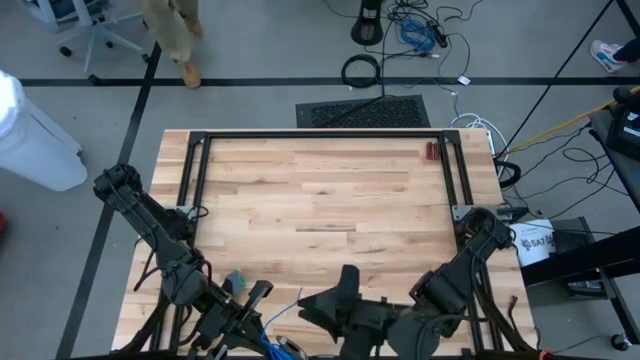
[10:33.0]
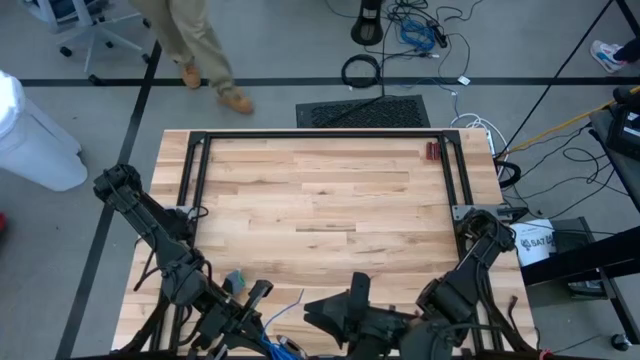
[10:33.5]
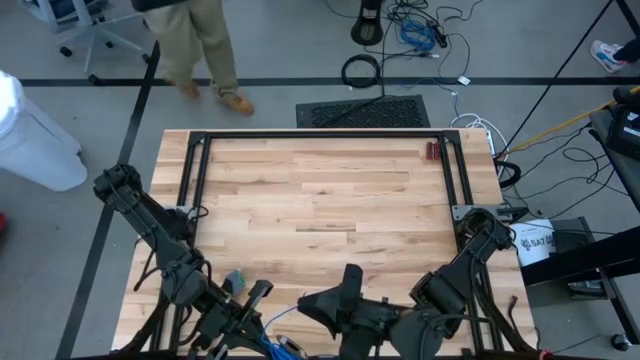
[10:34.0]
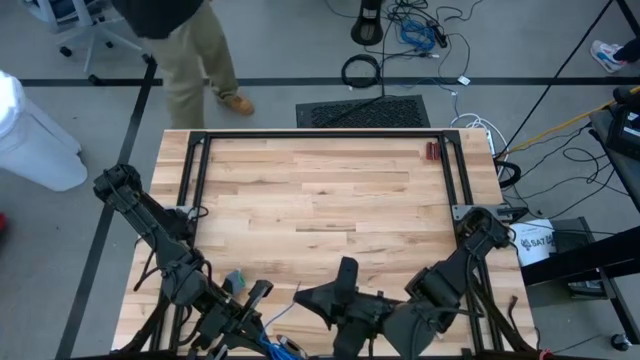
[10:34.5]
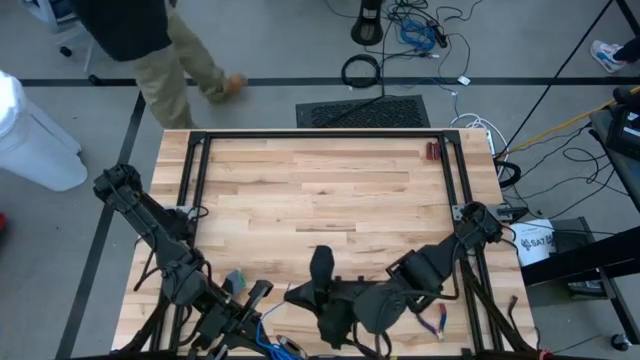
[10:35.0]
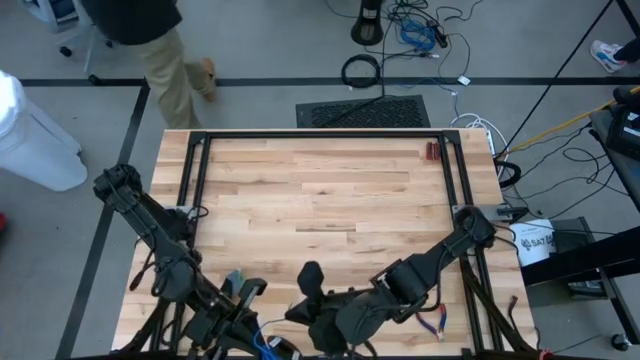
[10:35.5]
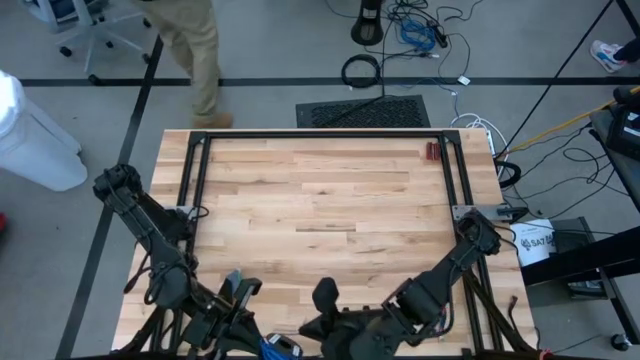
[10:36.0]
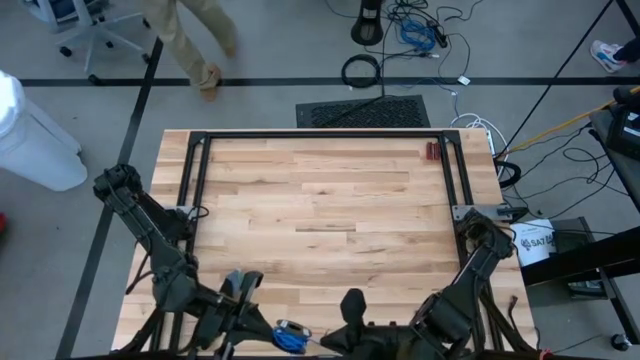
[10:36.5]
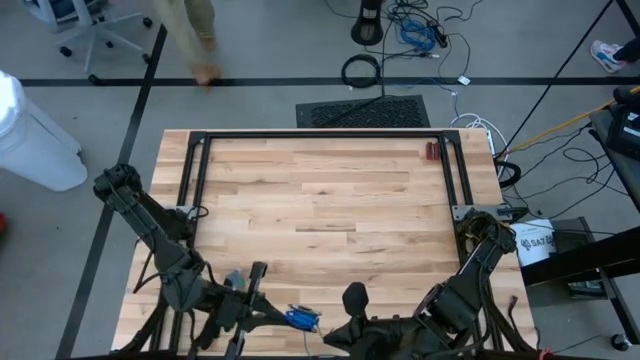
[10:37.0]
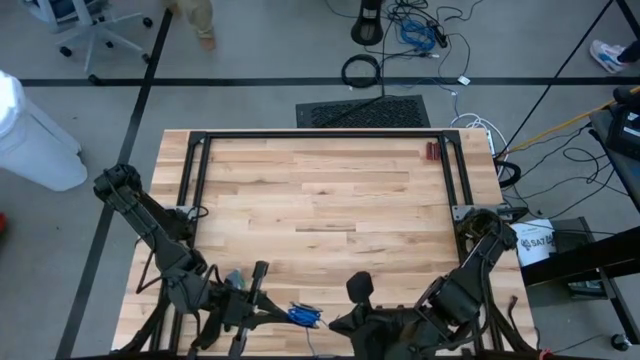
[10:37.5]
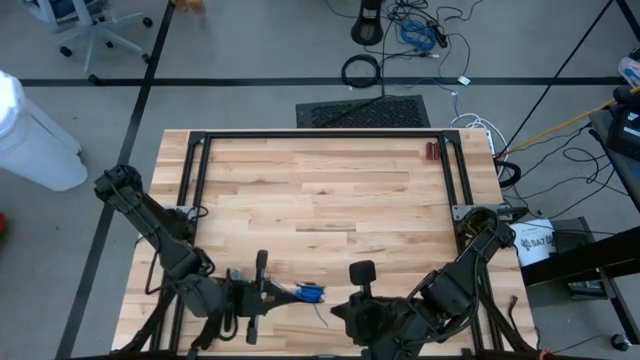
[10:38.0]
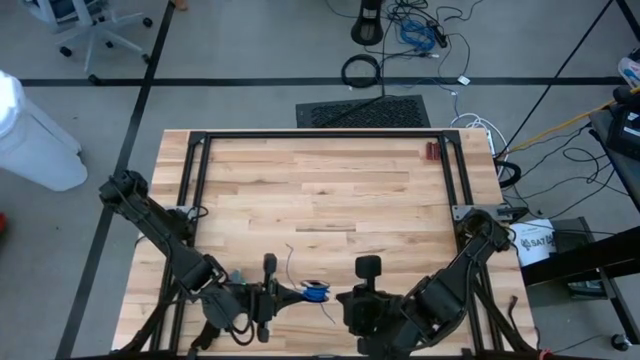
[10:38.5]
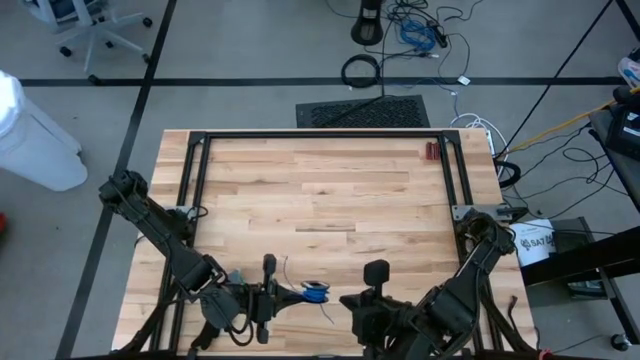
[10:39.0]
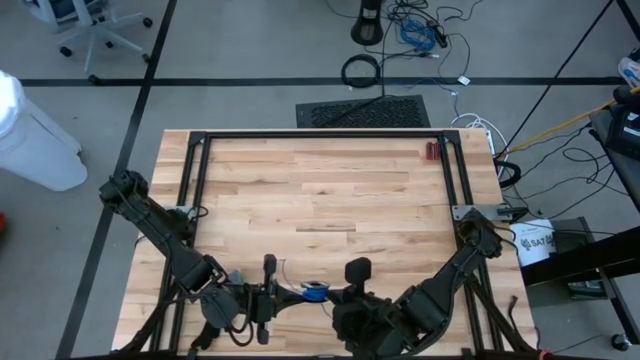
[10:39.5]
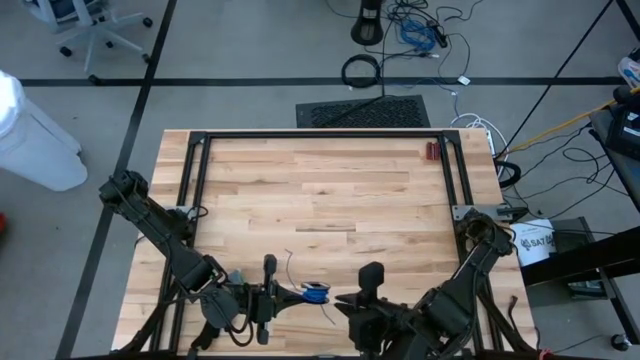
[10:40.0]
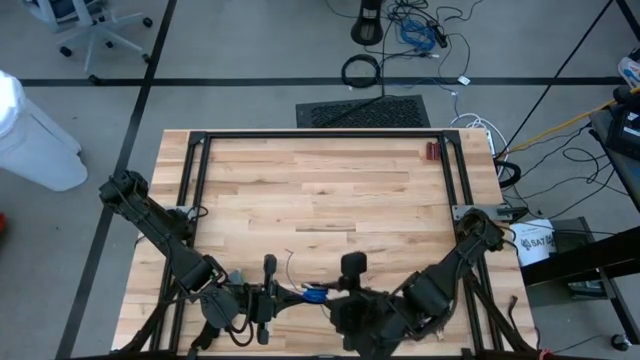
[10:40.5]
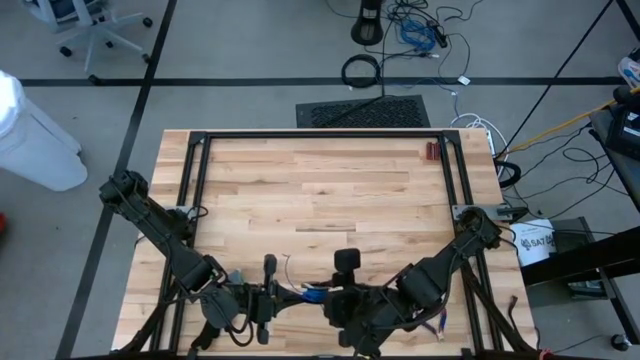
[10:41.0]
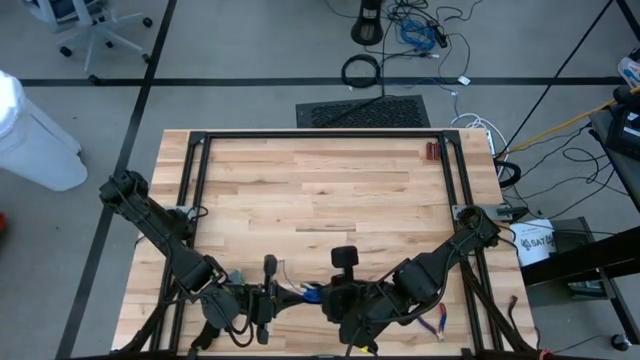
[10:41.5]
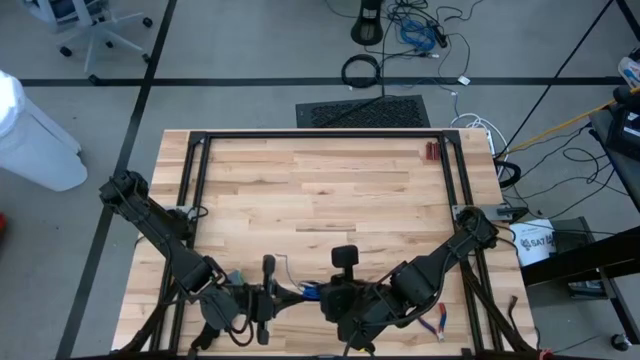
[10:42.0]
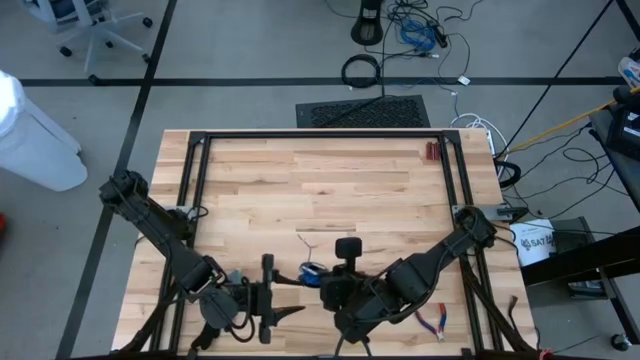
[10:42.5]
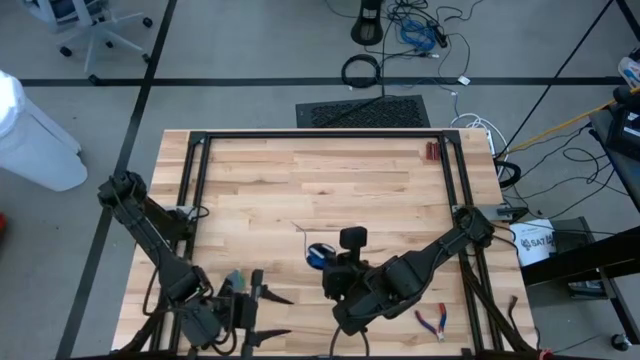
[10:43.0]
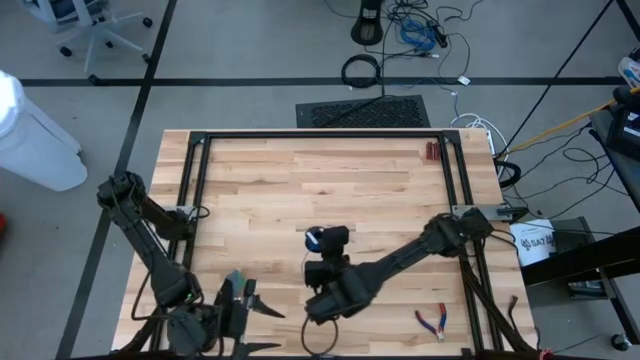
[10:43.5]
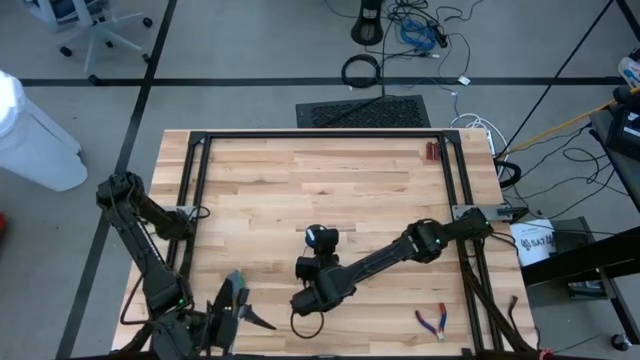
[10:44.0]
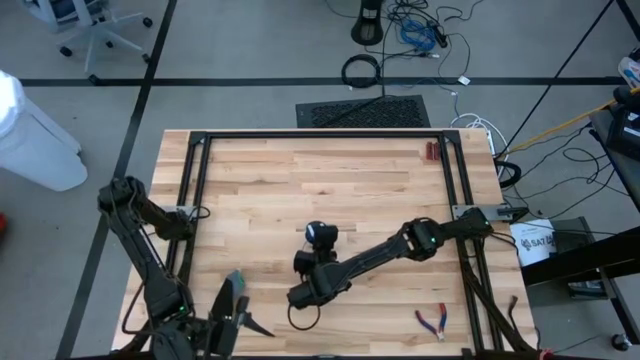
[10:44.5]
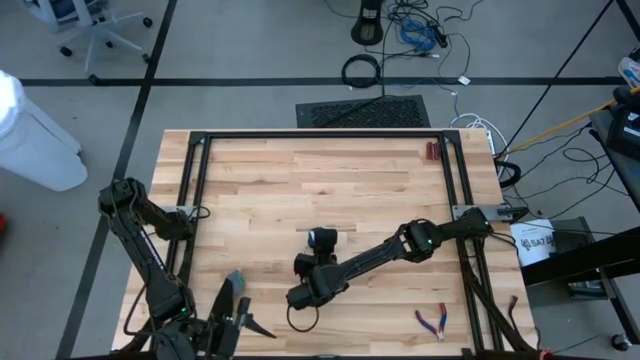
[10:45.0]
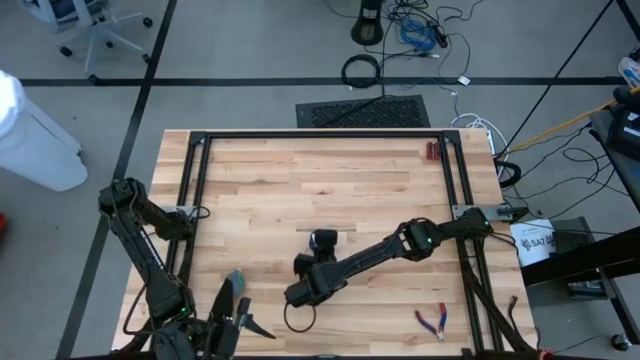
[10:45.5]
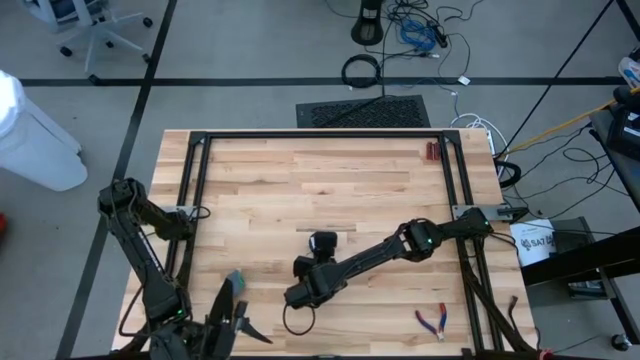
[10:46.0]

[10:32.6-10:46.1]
Task: Coil cords
Coil the blue wire onto the black spool

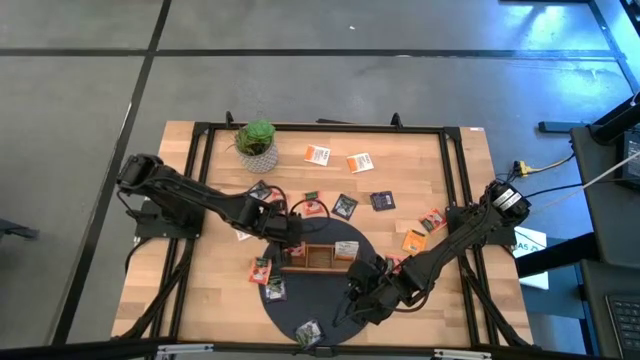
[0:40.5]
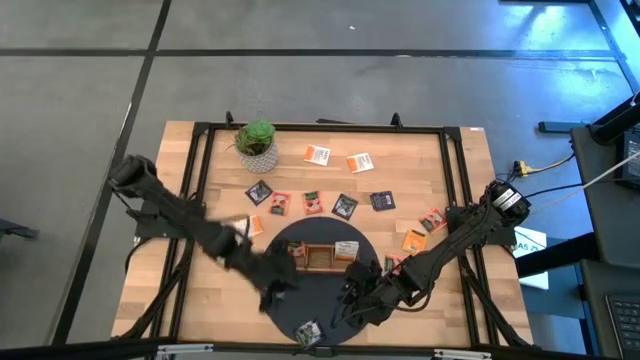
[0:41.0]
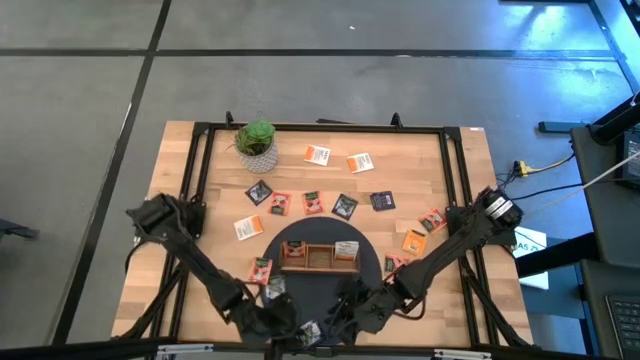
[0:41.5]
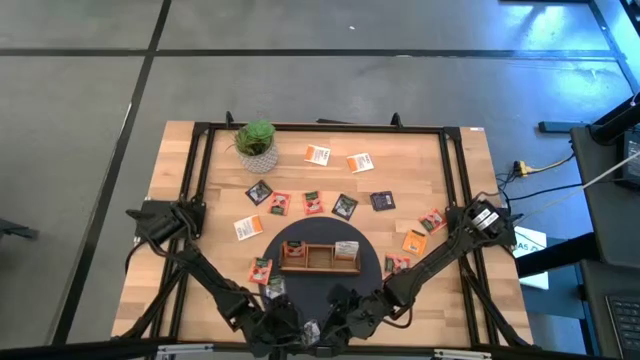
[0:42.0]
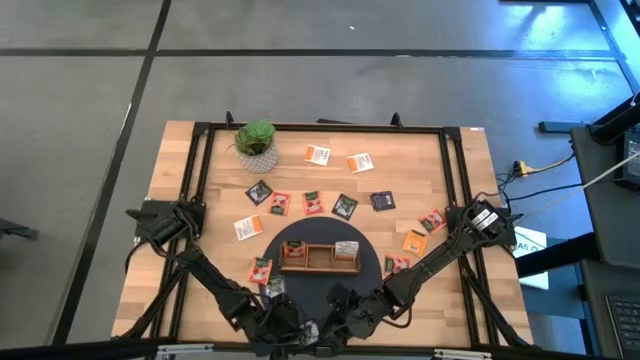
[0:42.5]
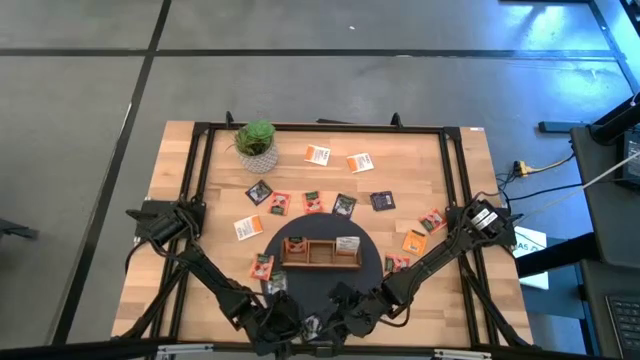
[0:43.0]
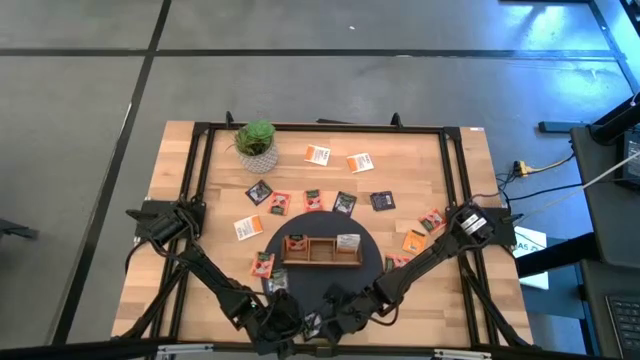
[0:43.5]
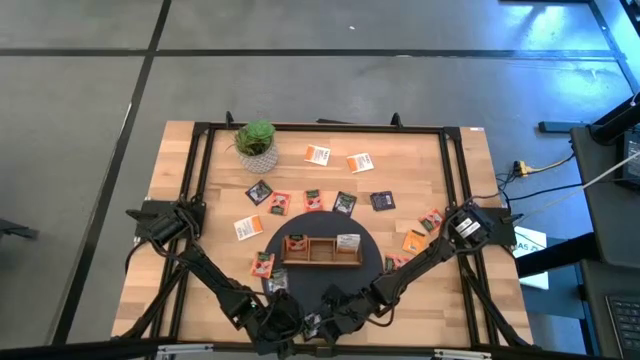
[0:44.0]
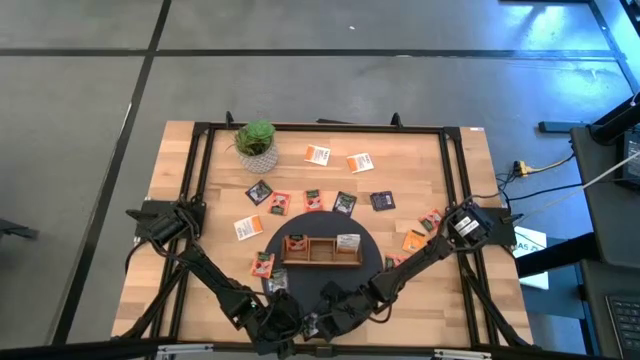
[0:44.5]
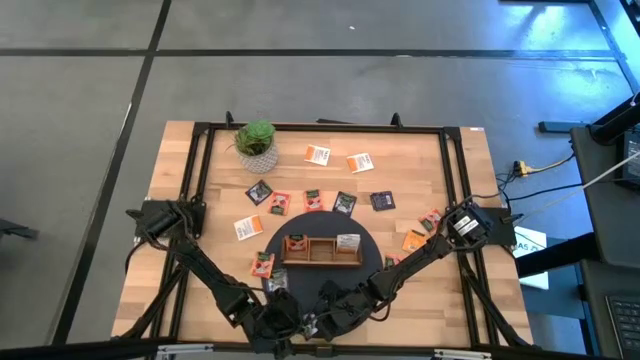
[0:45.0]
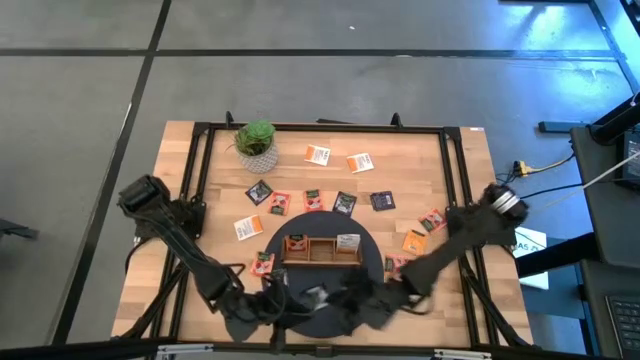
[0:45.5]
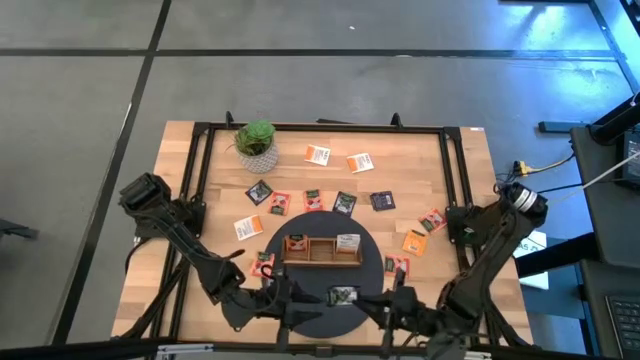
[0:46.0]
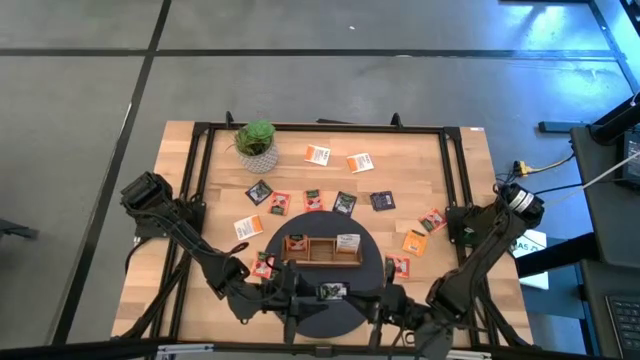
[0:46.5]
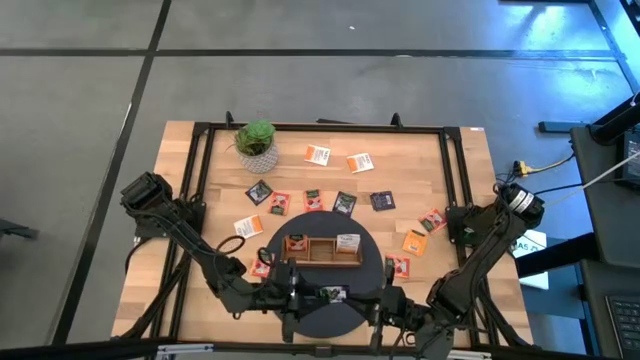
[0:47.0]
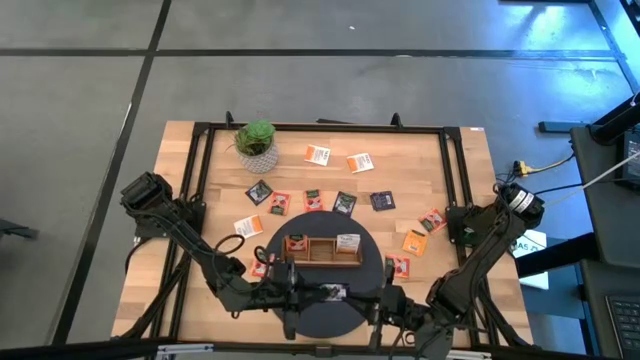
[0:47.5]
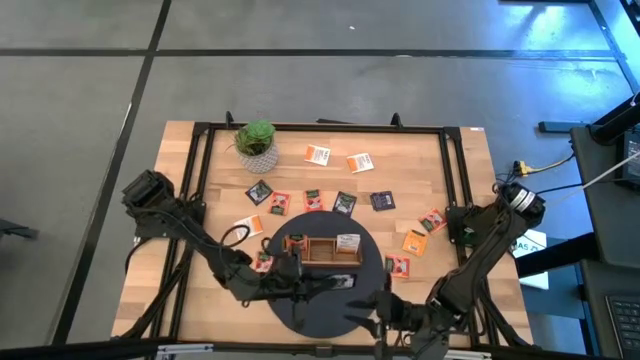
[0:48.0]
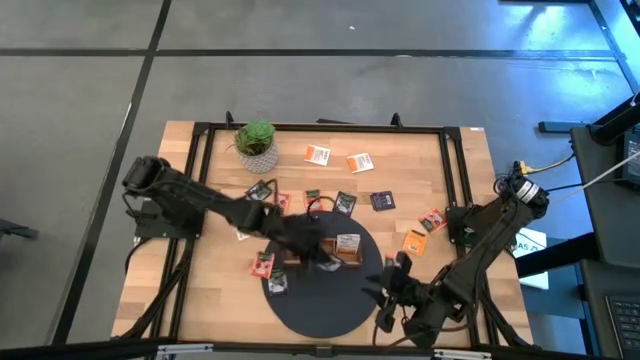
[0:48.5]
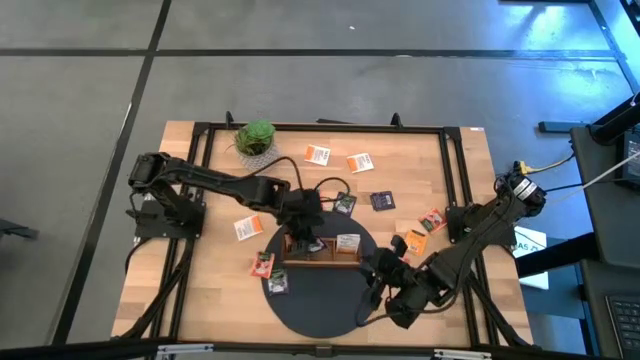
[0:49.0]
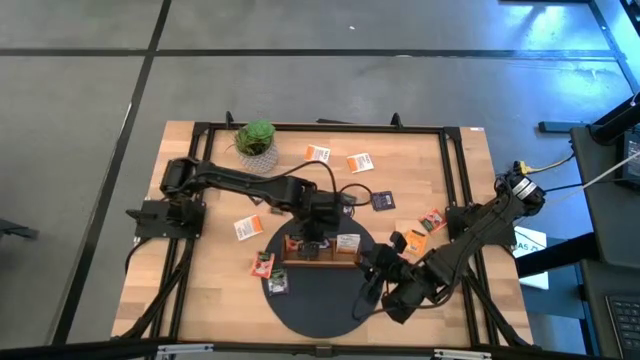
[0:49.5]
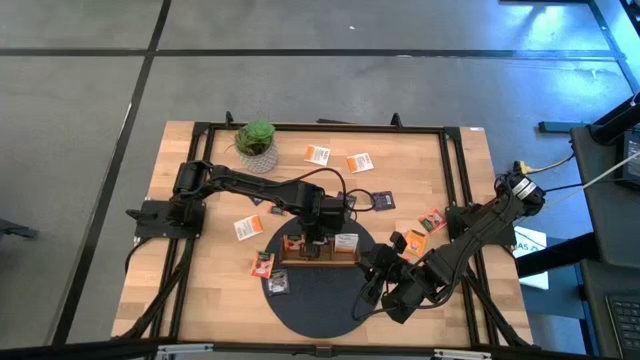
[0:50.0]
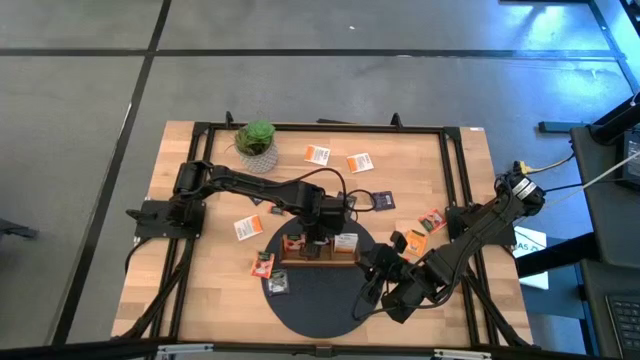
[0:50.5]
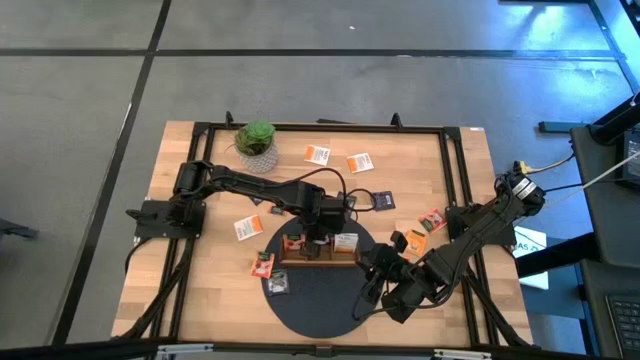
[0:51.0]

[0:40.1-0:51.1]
Task: Pick & Place Tea
Put the violet tea bag into the middle slot of the wooden organizer
